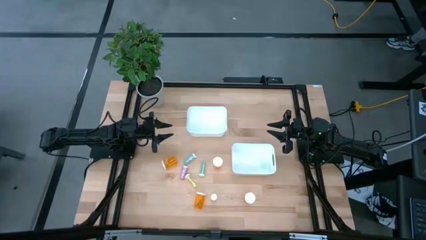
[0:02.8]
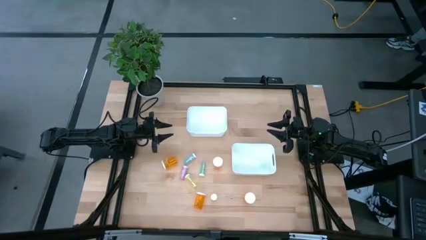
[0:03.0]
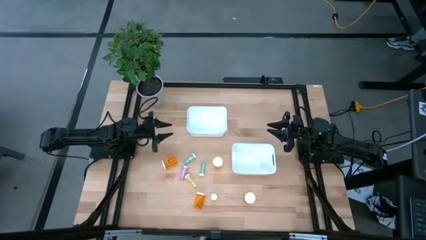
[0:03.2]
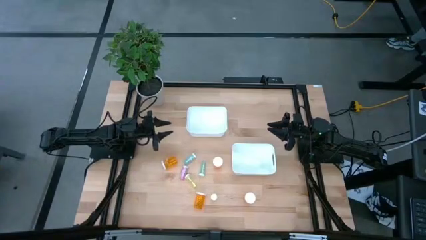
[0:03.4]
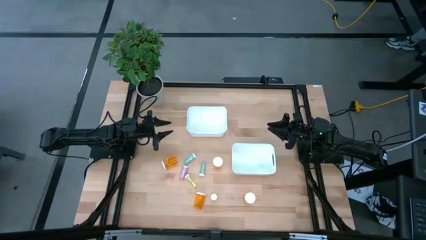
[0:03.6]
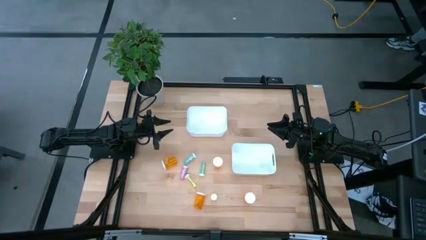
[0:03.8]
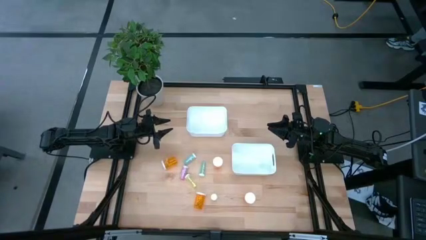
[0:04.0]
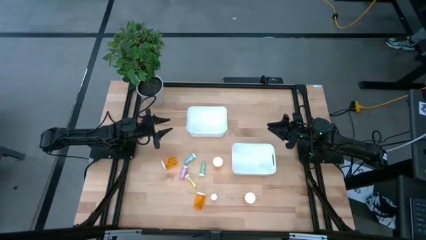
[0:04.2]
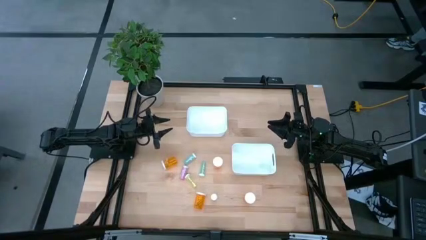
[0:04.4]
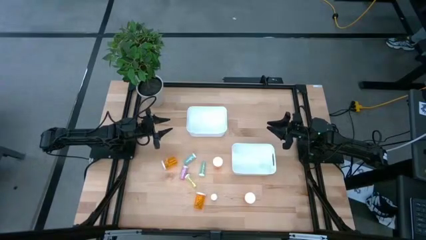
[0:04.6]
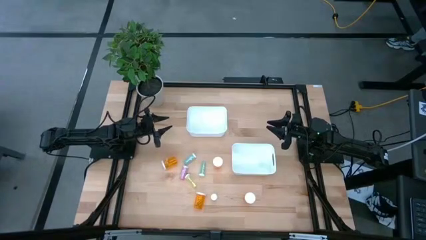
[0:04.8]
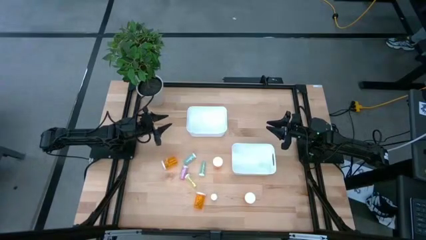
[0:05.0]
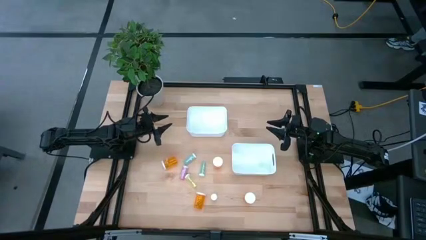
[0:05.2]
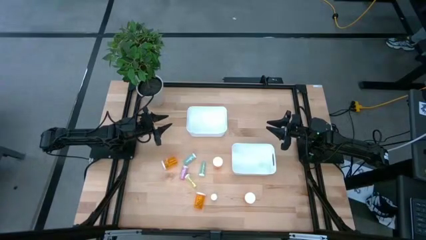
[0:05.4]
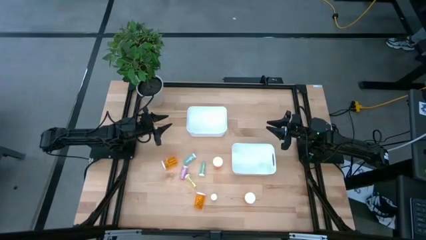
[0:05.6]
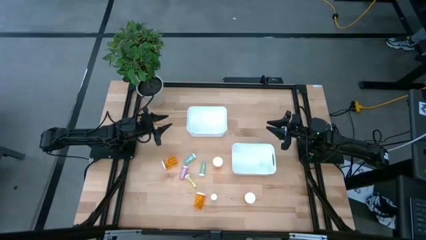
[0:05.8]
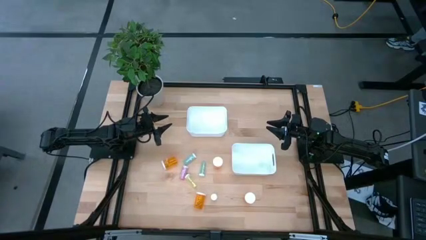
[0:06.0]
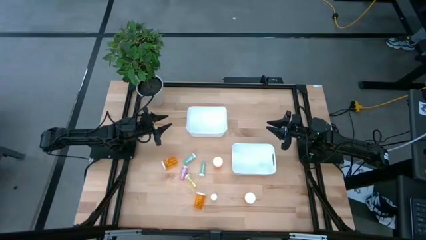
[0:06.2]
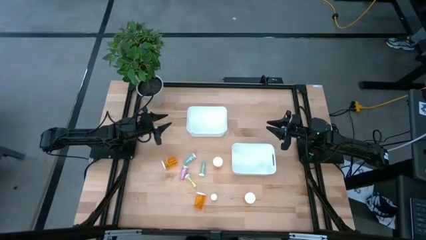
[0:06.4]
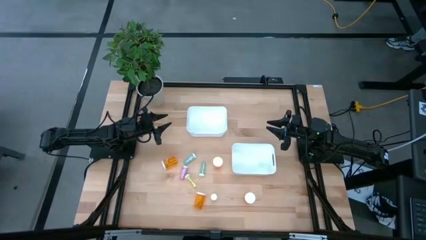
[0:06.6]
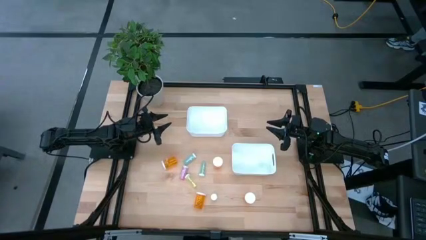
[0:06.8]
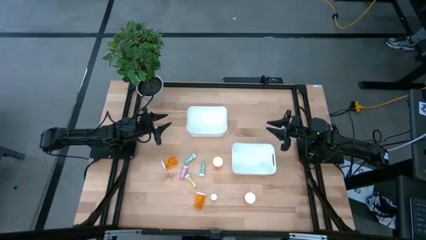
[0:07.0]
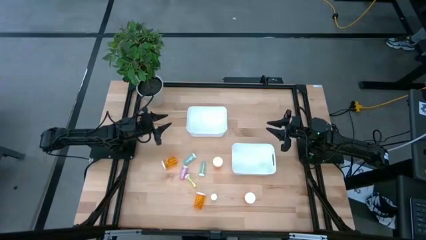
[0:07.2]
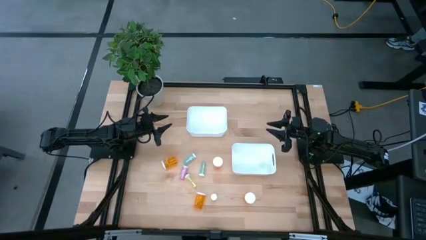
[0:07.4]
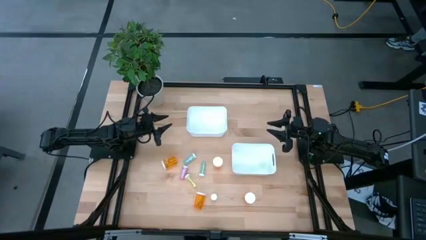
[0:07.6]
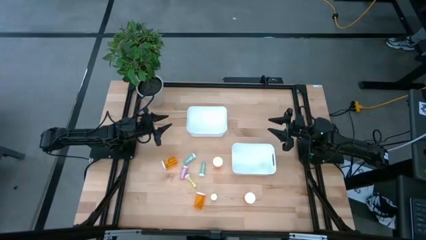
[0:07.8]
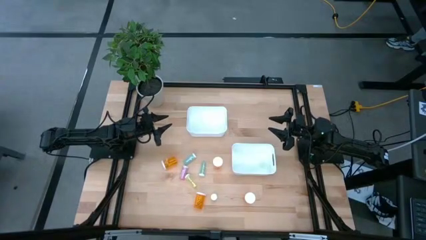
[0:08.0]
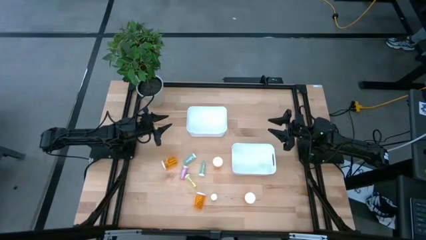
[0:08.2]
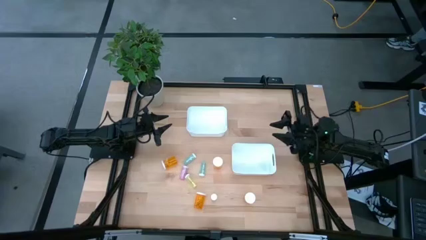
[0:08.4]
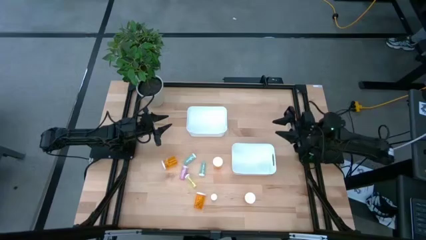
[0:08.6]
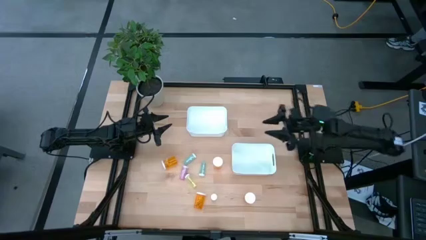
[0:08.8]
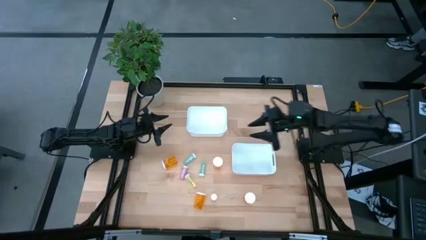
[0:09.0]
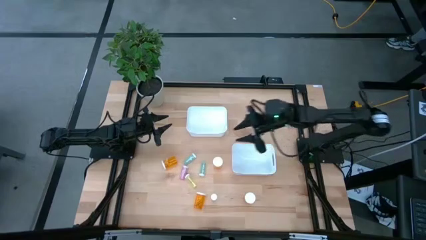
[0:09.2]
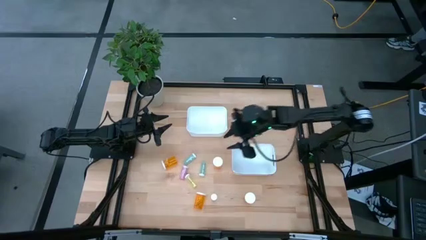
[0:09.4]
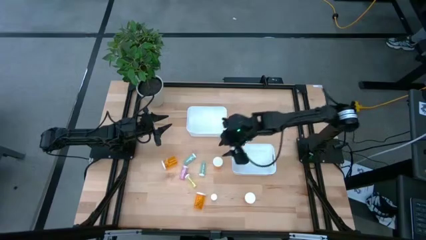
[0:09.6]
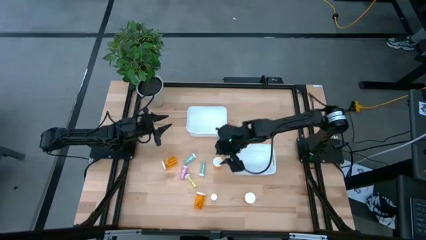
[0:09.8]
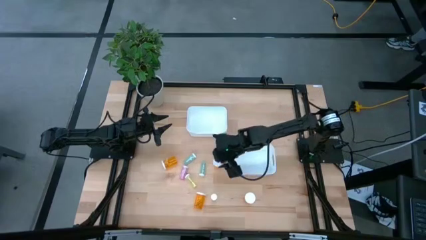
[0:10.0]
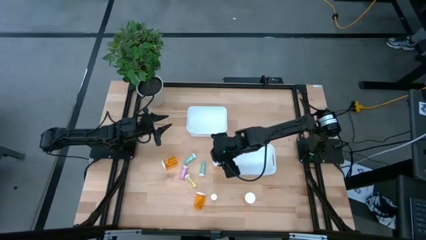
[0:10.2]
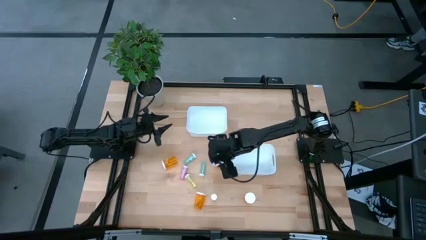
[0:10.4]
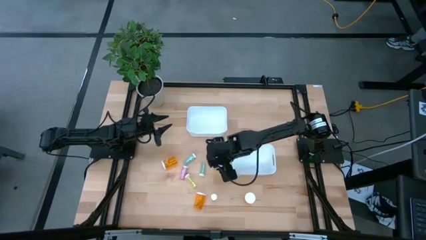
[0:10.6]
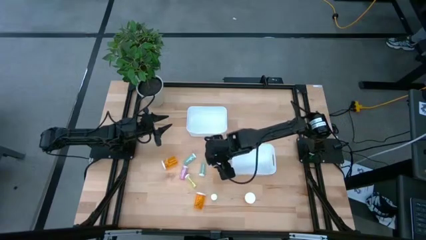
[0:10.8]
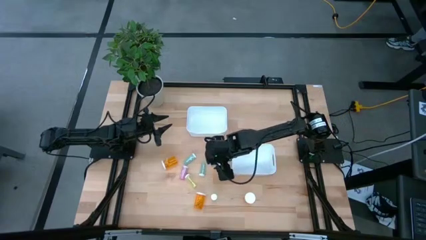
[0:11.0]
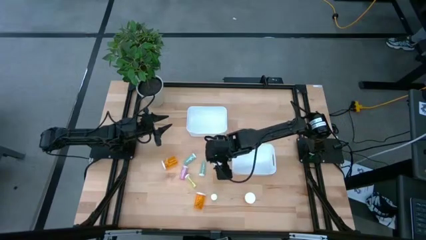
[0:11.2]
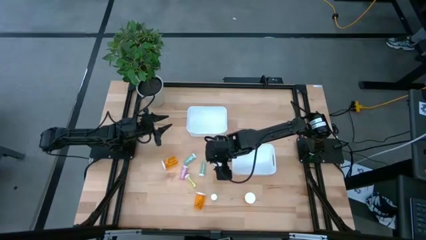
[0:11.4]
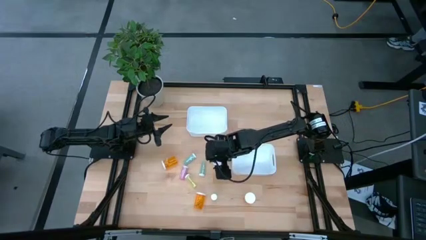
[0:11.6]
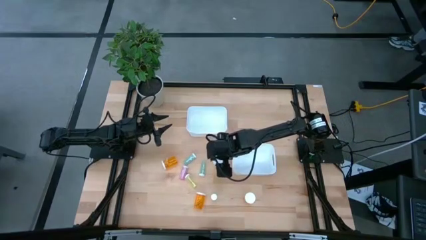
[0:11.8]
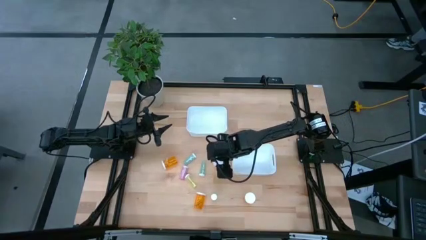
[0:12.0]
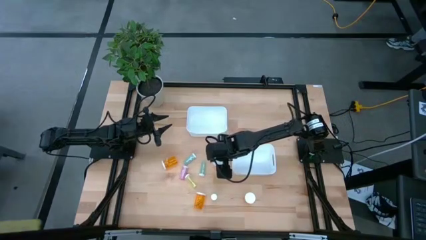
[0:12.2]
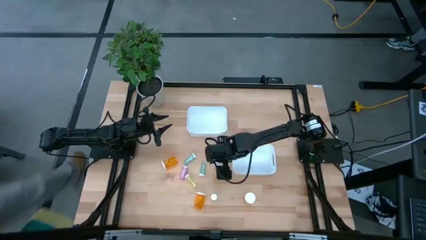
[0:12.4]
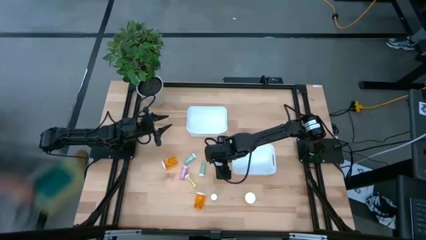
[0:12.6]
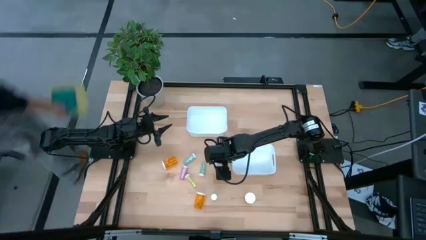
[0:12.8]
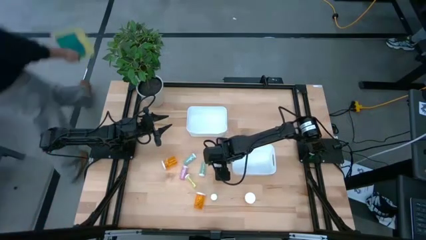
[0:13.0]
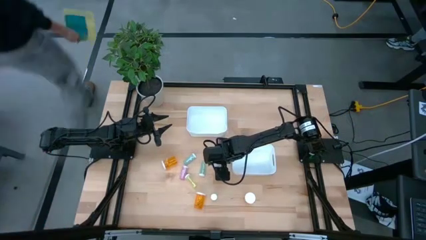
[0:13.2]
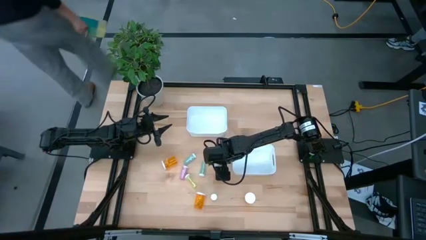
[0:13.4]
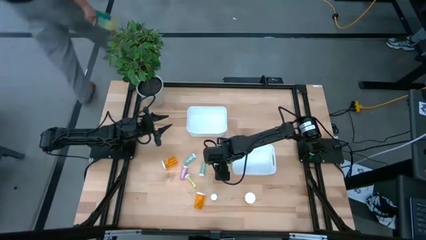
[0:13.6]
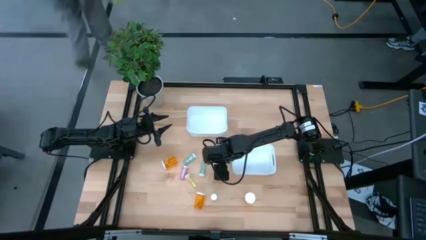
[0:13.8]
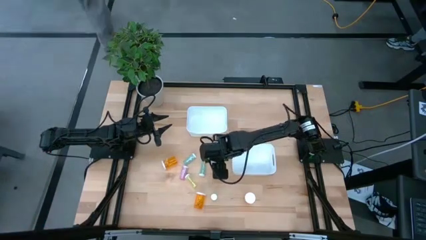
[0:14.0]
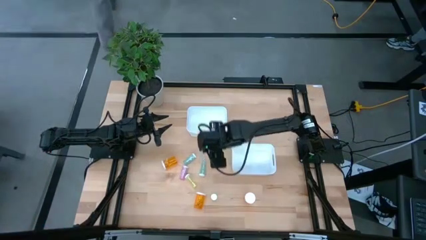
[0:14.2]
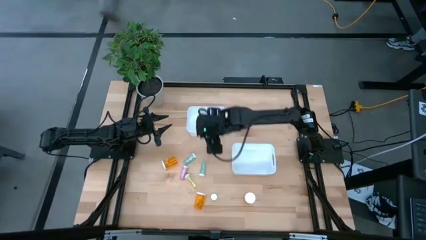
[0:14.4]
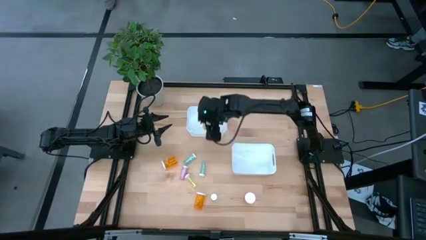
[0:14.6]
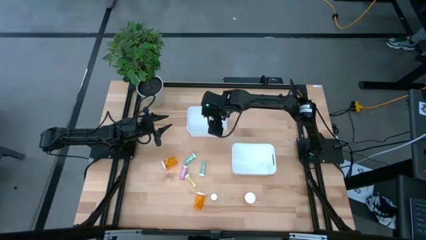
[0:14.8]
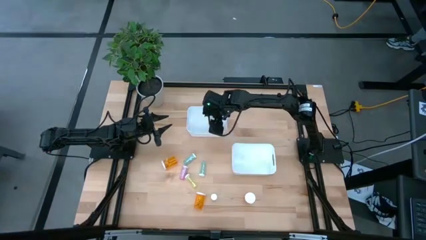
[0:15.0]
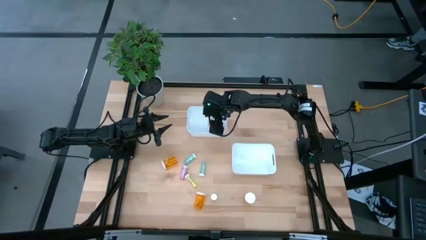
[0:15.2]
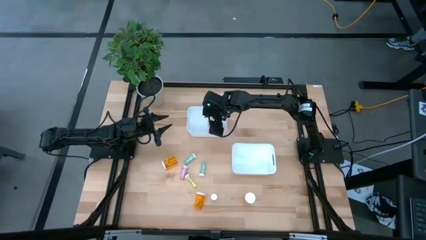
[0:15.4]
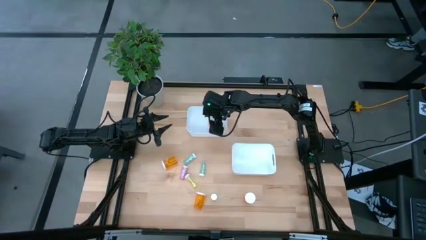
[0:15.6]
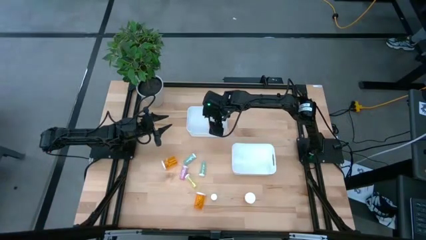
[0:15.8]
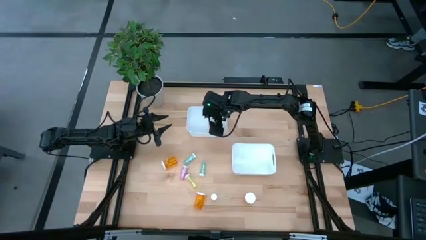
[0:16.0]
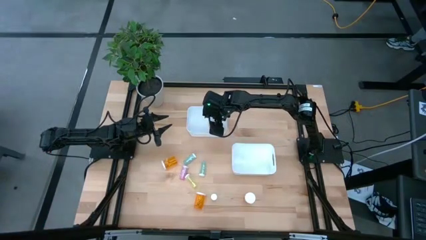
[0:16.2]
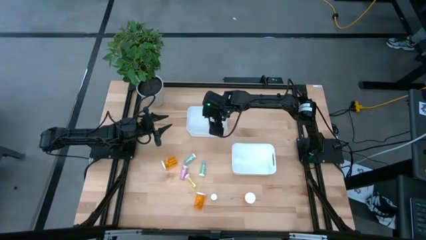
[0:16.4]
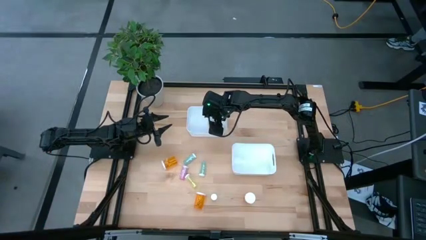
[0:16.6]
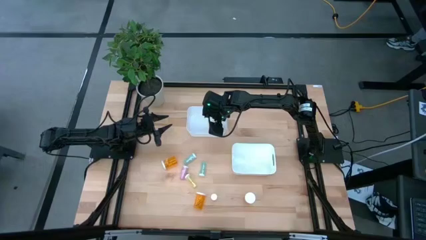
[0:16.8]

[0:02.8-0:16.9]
Task: Pick and place medicine bottles into bin by pill shape (circle, oval)
Put the large orange pill bottle into the top white bin
